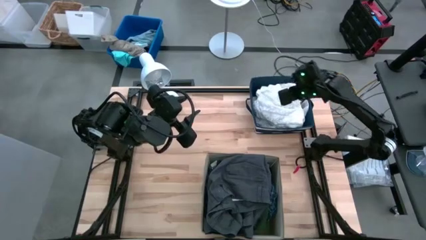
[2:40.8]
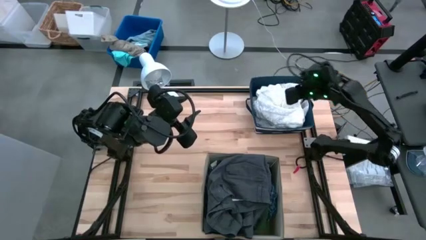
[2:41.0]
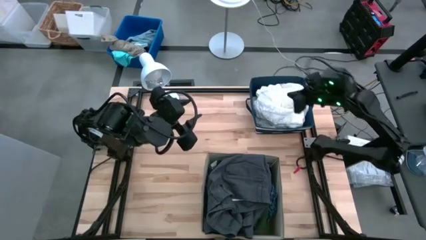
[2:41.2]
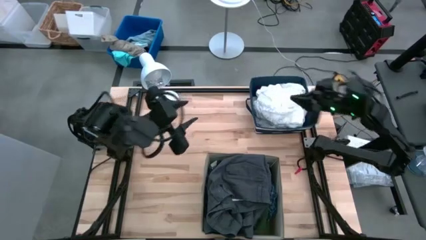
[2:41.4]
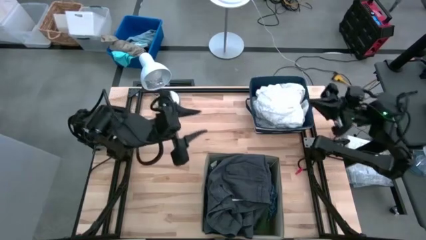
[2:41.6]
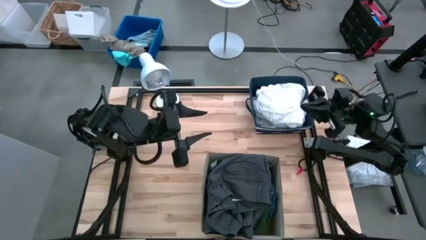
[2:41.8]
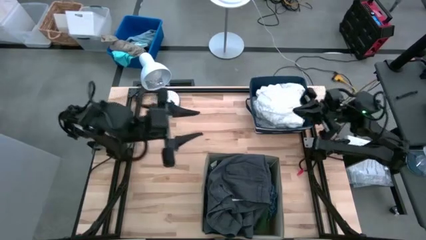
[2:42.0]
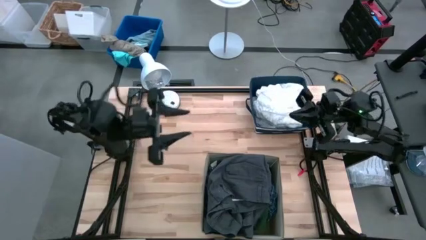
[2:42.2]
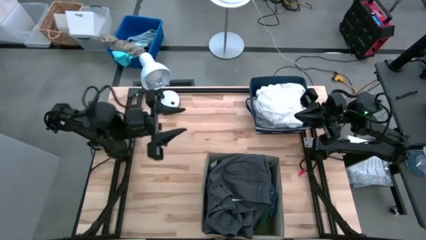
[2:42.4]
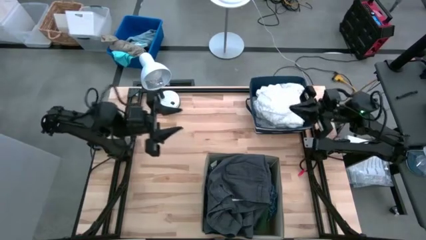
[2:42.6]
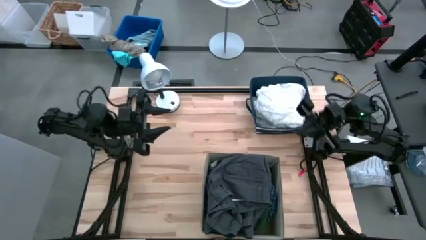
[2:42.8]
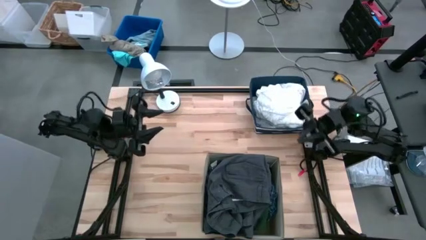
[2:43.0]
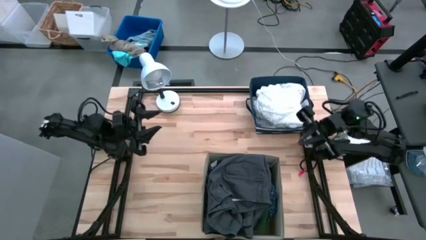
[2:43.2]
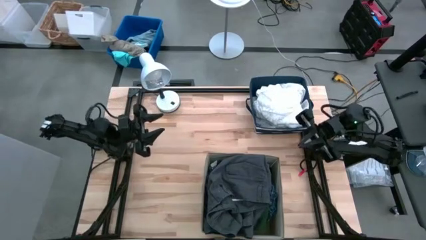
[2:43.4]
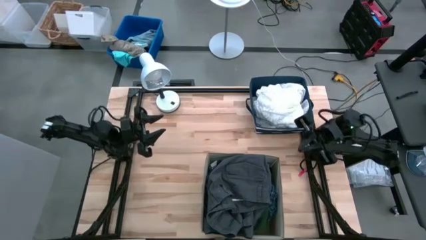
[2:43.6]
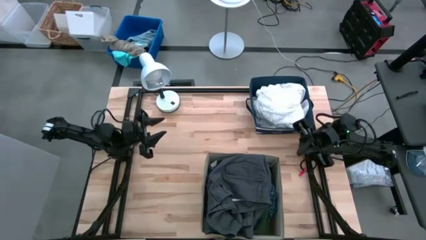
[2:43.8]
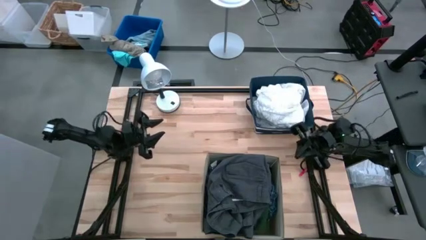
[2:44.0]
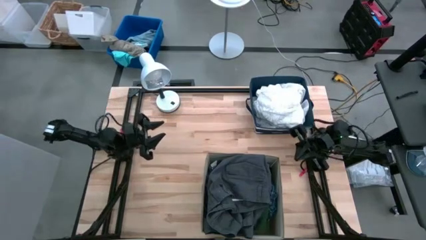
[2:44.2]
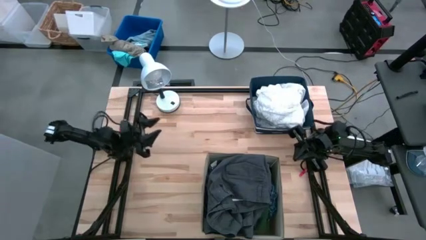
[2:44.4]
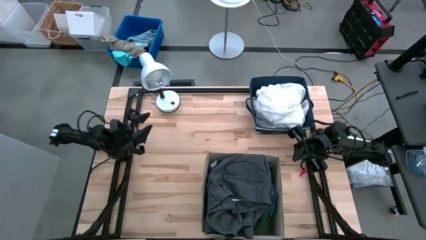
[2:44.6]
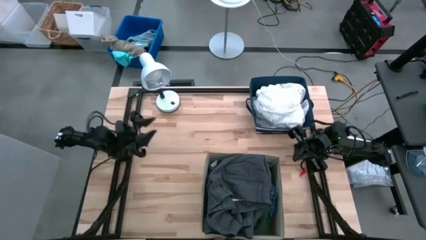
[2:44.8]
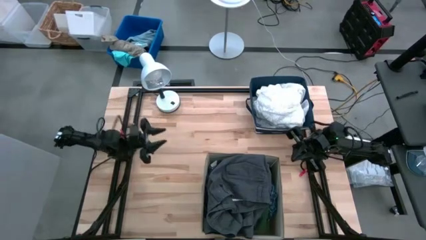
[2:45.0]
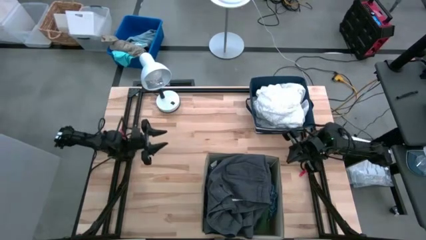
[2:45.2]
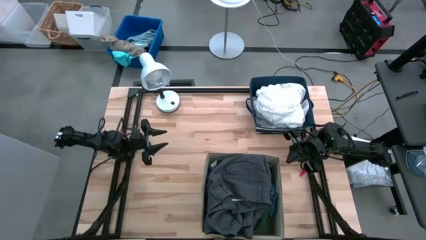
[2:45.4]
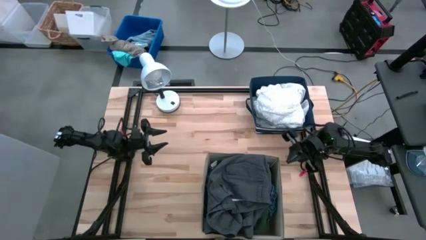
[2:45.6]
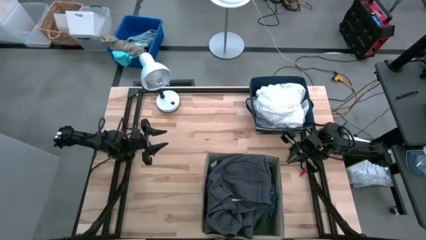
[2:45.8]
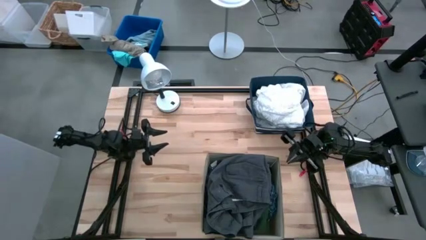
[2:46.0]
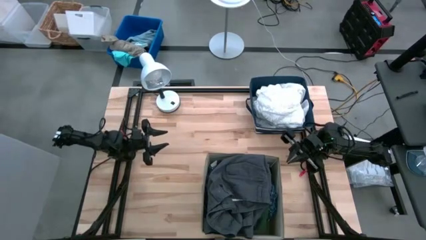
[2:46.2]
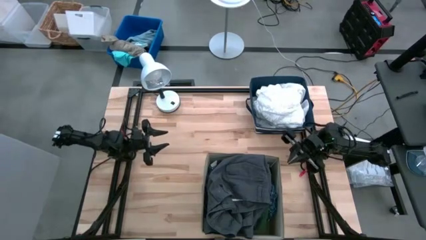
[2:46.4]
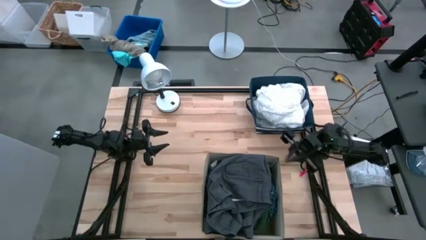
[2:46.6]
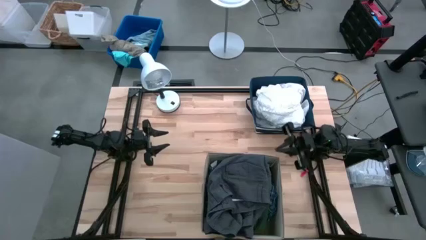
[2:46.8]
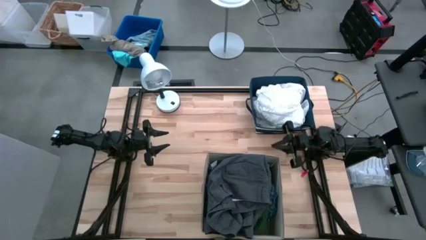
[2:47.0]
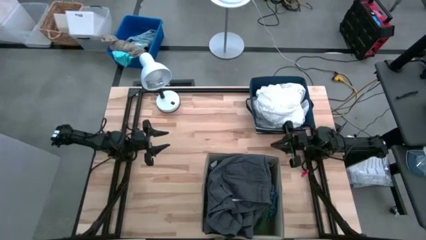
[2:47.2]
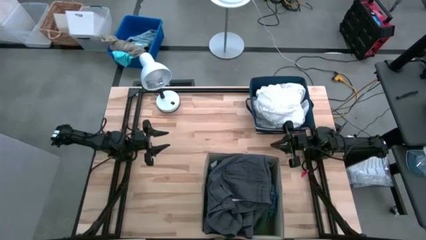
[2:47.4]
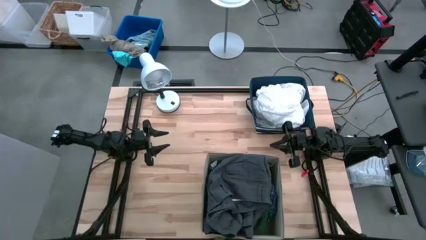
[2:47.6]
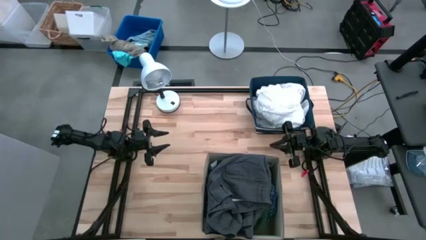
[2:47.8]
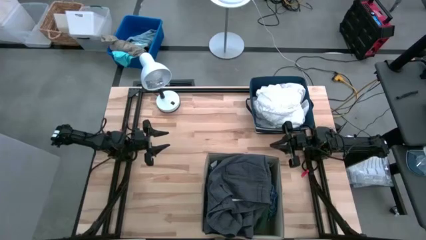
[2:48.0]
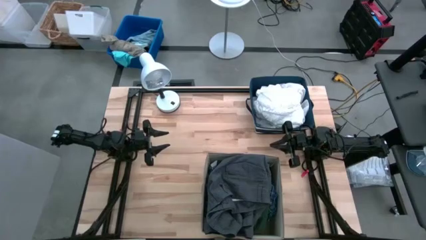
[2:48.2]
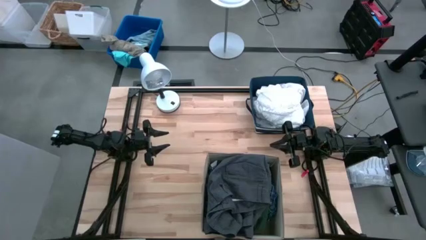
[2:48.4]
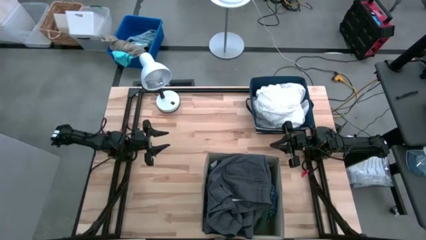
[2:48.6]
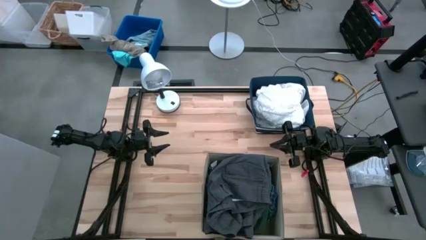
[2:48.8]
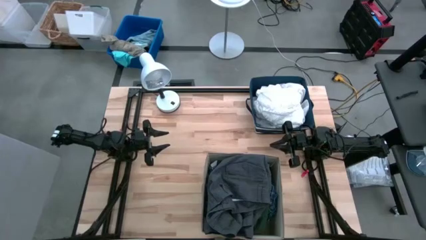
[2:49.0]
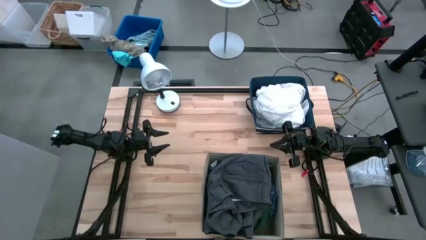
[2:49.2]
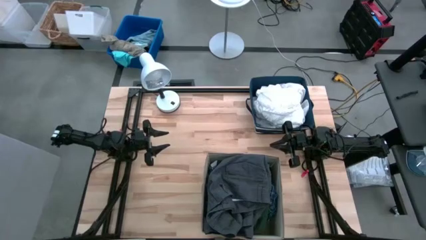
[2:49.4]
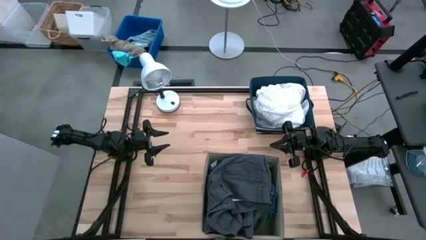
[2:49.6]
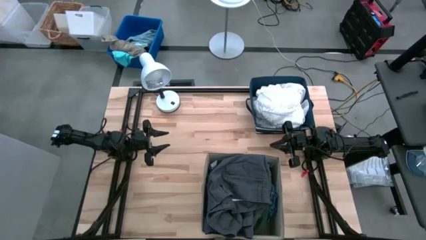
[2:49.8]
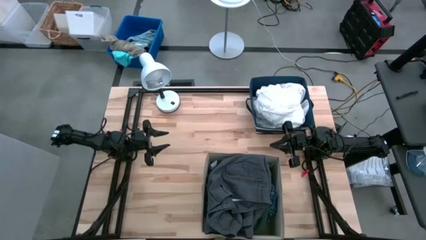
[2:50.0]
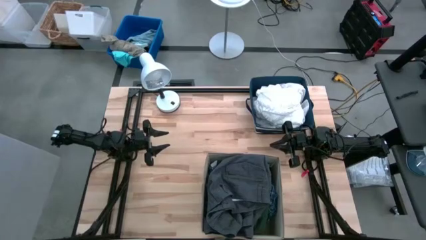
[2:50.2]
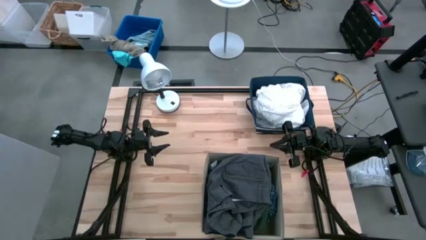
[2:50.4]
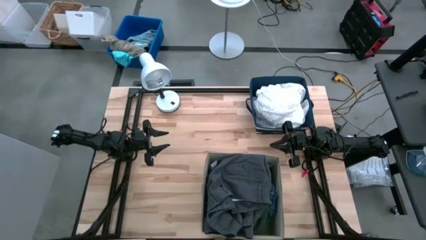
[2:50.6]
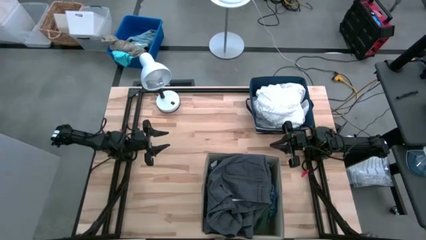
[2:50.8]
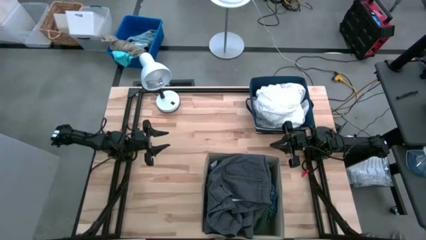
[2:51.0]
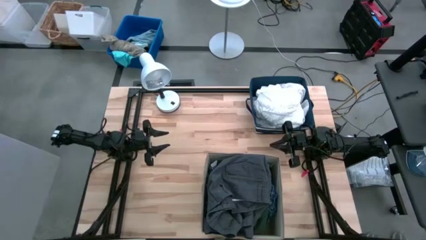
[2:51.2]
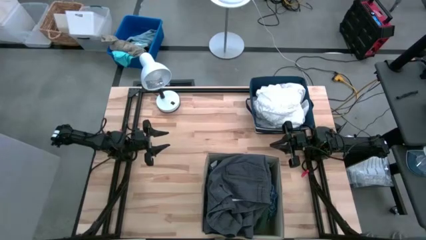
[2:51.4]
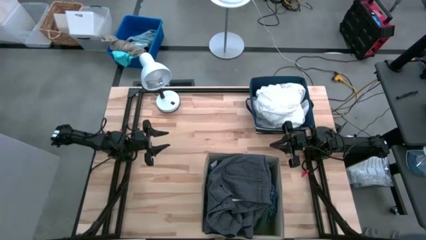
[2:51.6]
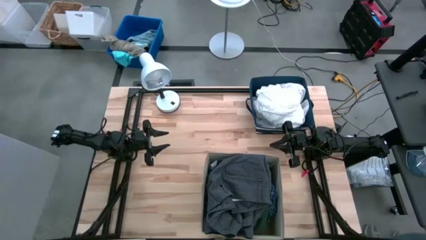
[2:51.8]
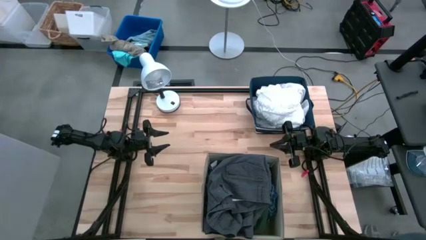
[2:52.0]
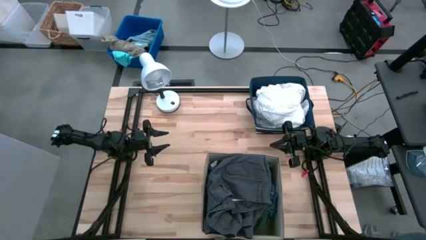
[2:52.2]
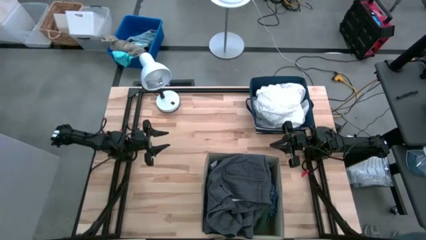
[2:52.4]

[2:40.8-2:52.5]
Task: Sort clothes
Return to Home Position

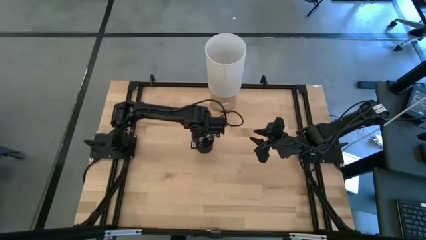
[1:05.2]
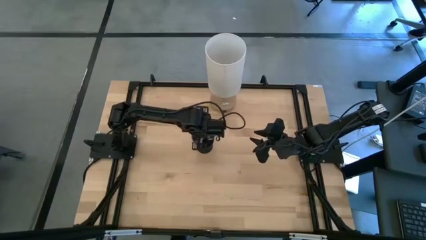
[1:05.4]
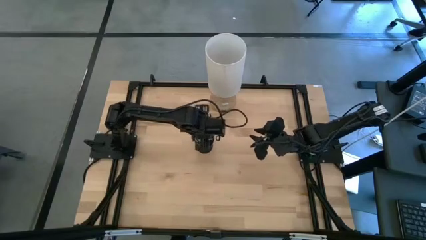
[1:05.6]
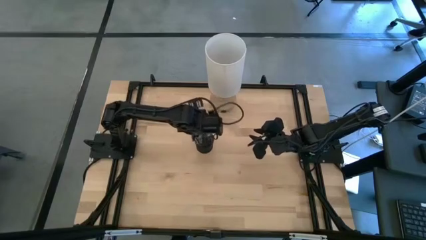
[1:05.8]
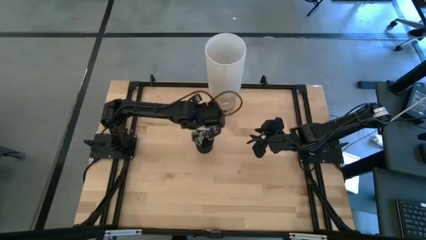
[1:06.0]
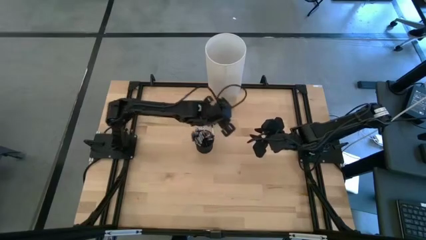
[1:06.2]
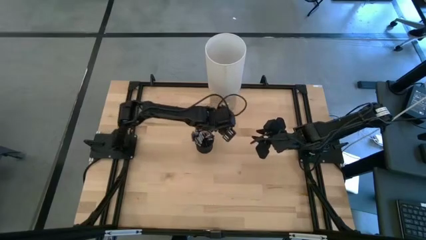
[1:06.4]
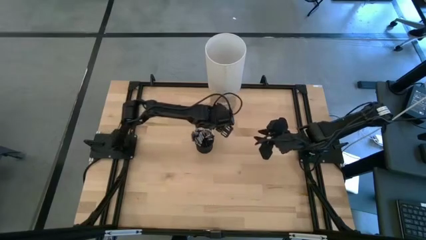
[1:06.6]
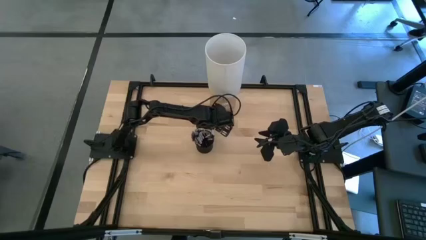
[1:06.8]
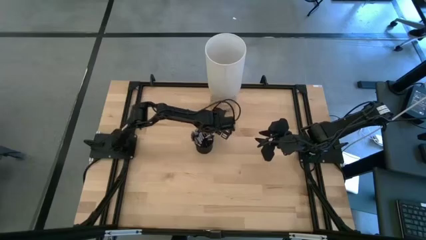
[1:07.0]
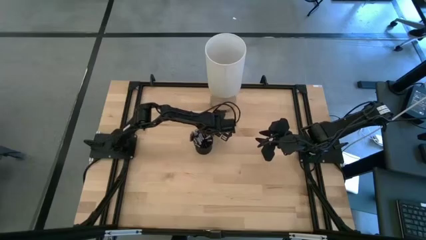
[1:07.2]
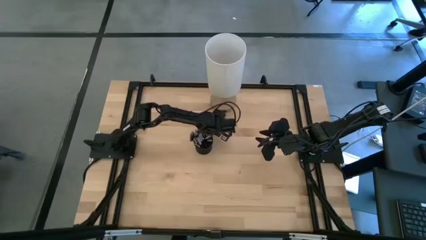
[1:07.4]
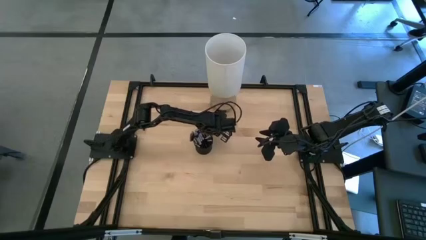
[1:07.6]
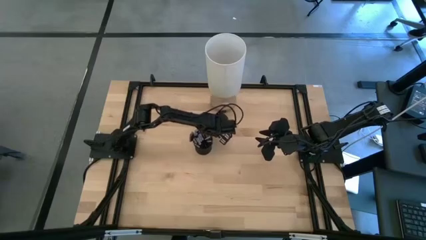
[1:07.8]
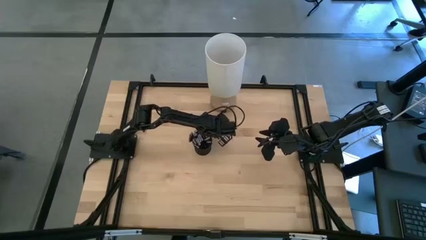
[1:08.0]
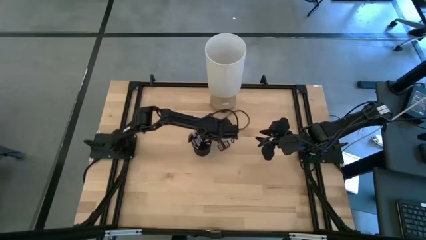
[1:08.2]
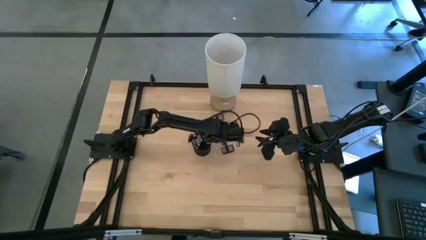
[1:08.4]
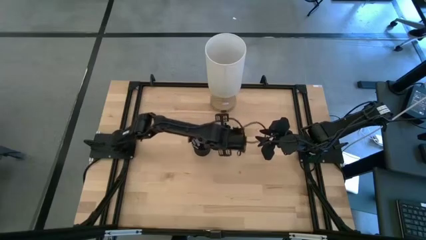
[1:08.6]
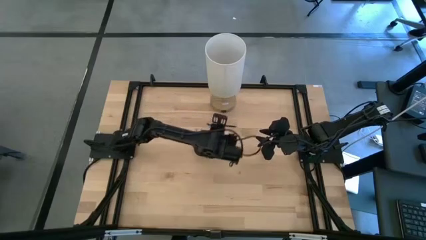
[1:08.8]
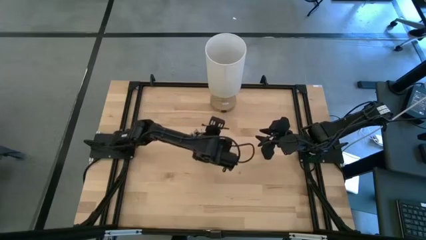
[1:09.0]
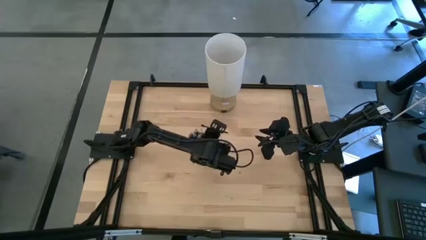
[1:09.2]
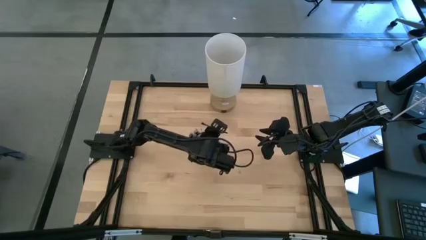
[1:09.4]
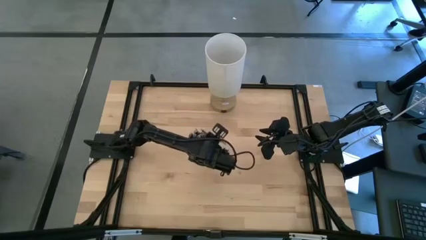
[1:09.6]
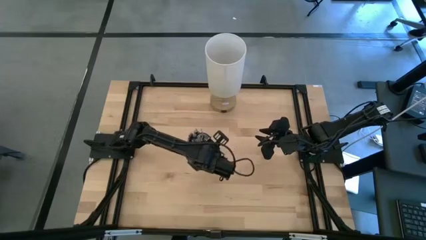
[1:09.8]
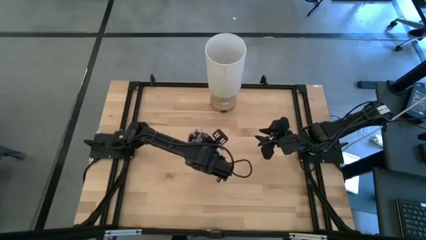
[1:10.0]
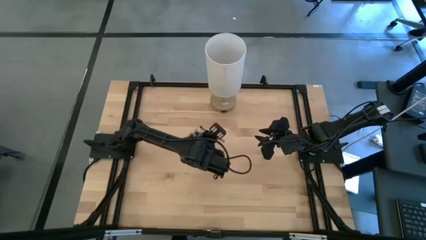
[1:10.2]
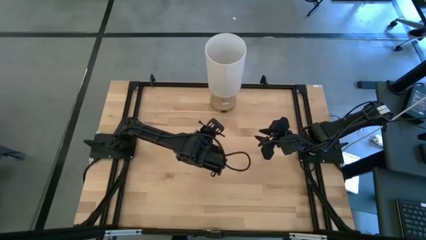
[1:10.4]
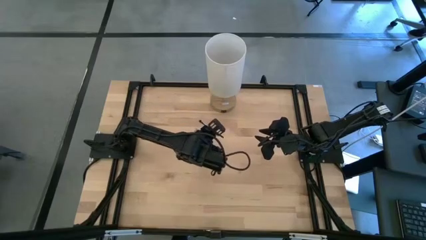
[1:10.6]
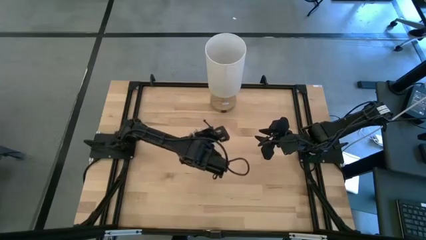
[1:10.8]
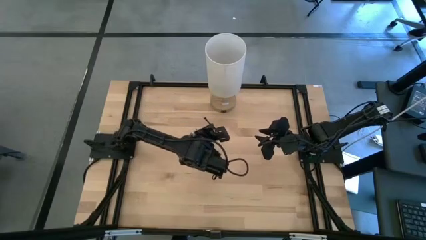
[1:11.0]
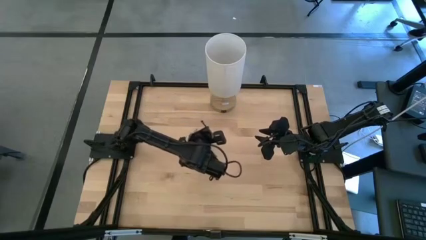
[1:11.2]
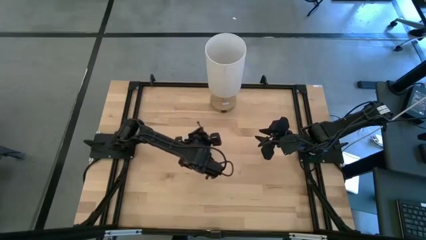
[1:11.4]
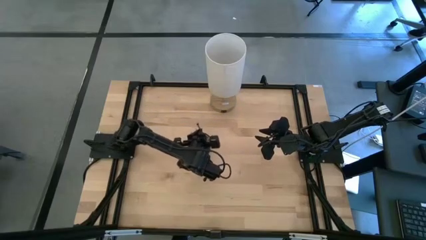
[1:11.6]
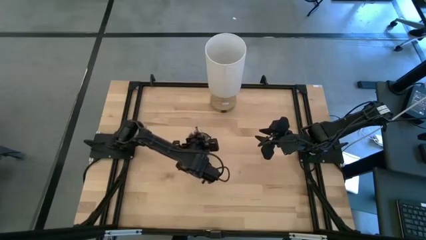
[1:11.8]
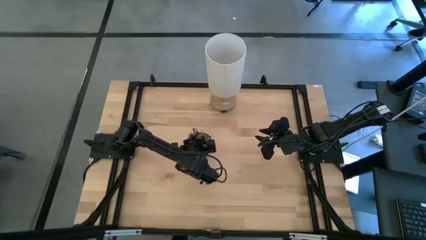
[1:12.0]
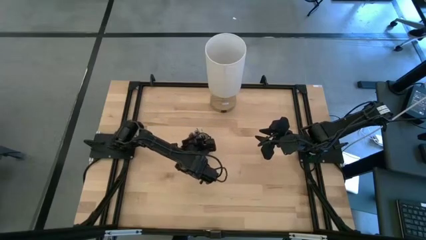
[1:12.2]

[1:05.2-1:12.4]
Task: Put items in baskets/containers
Put the eyeshadow brush into the holder
